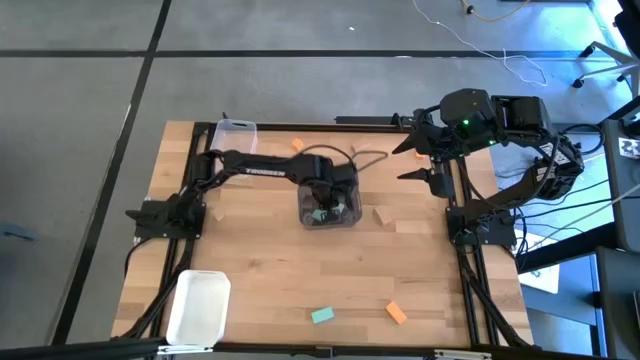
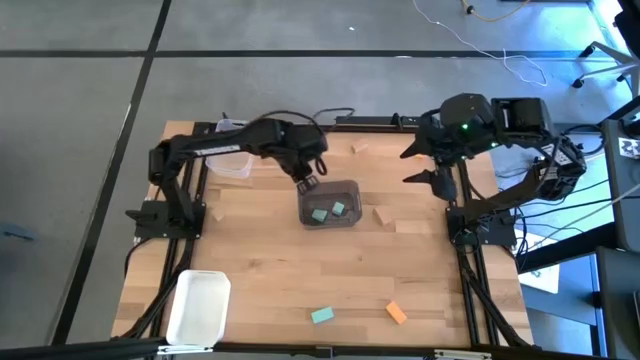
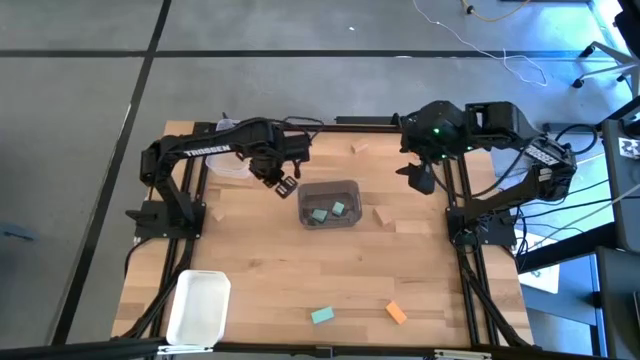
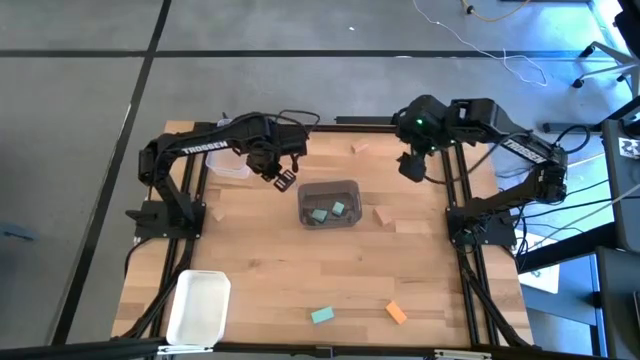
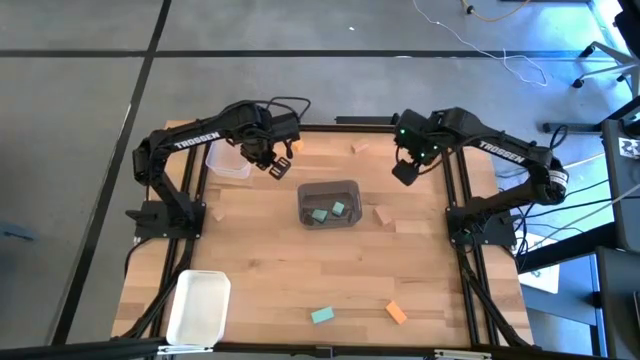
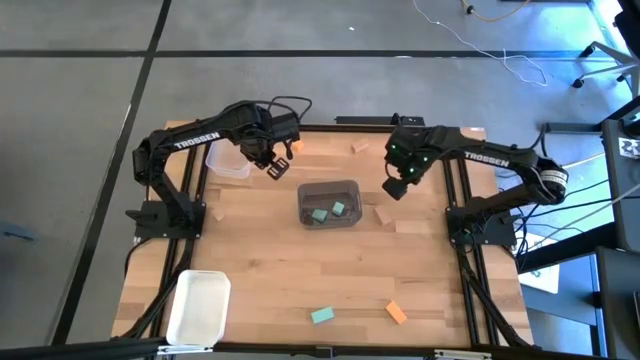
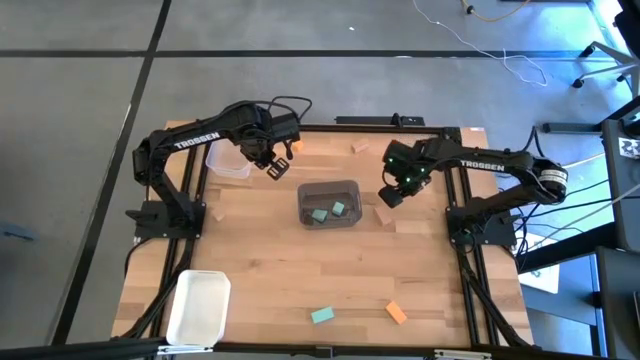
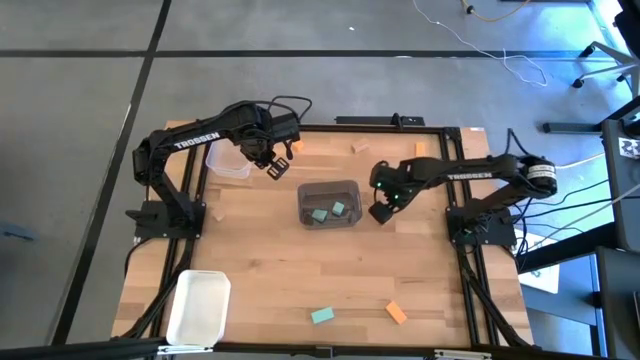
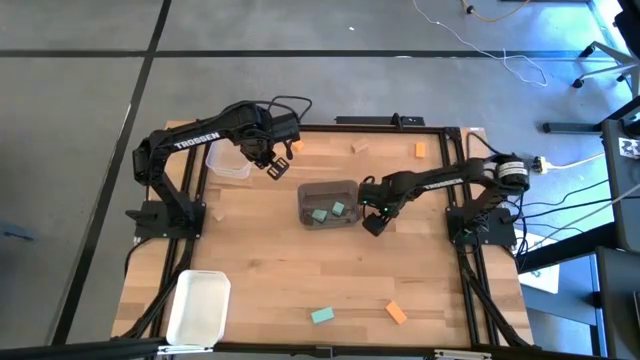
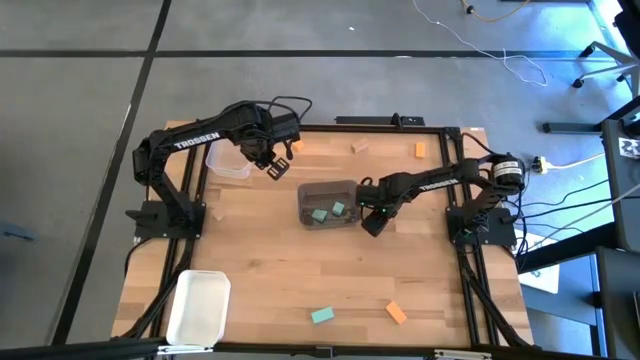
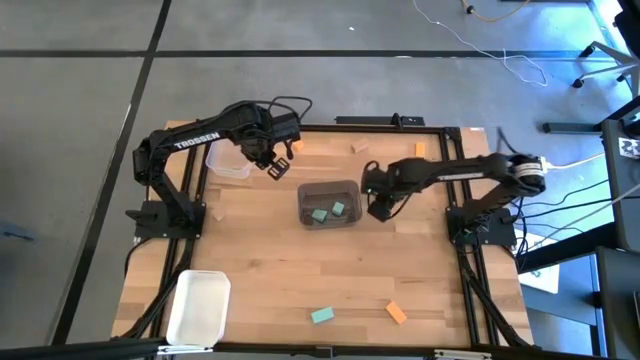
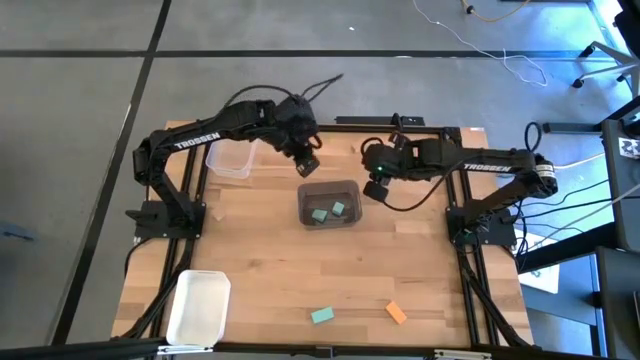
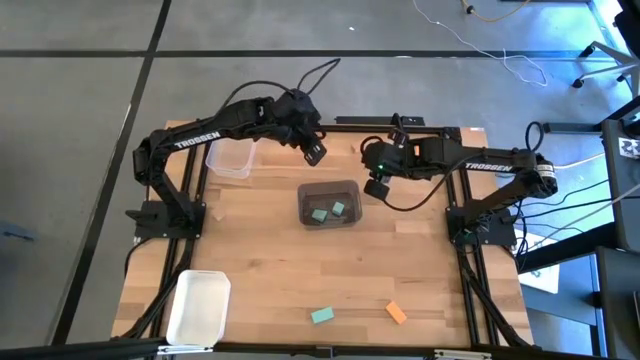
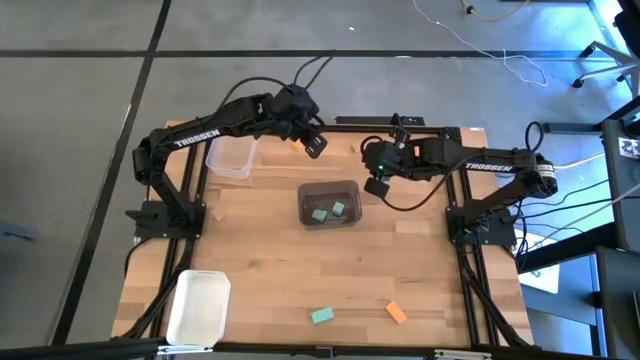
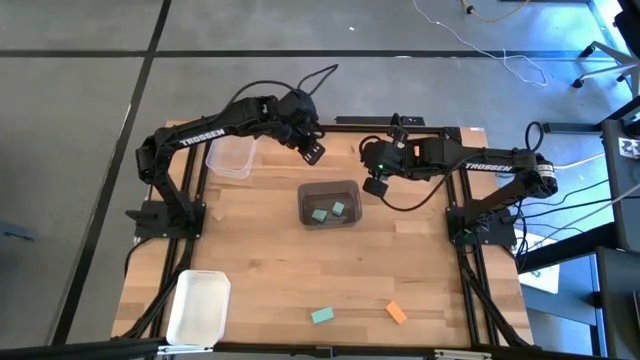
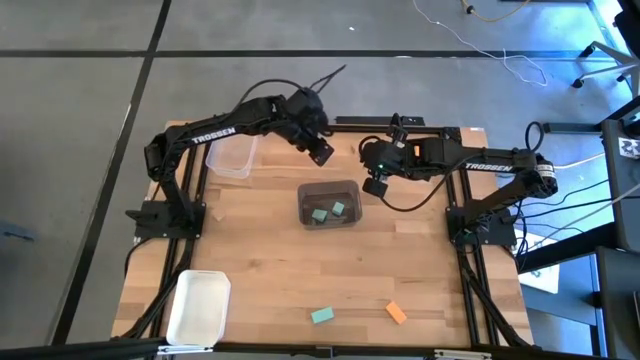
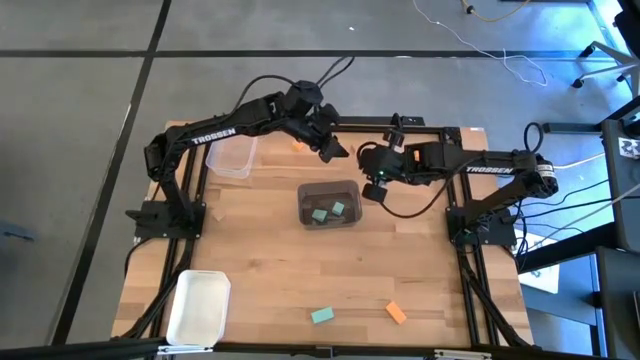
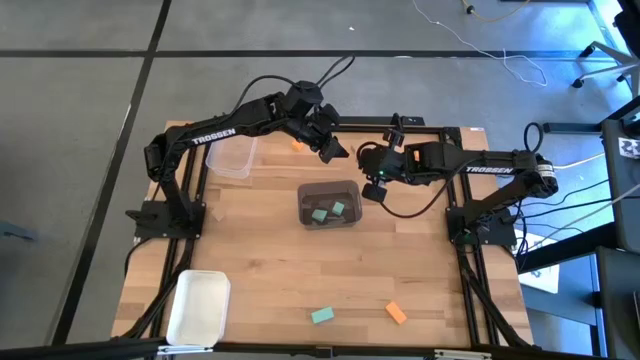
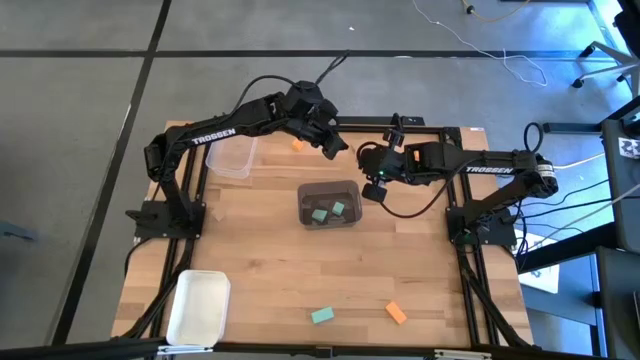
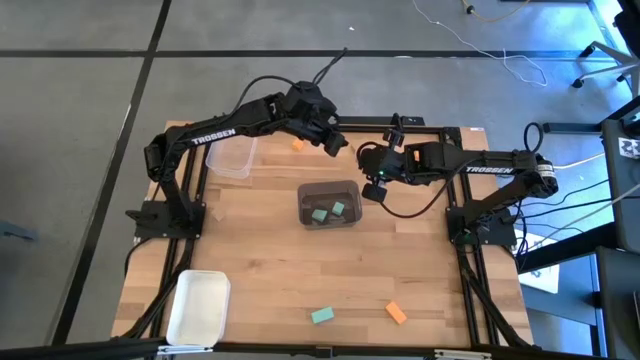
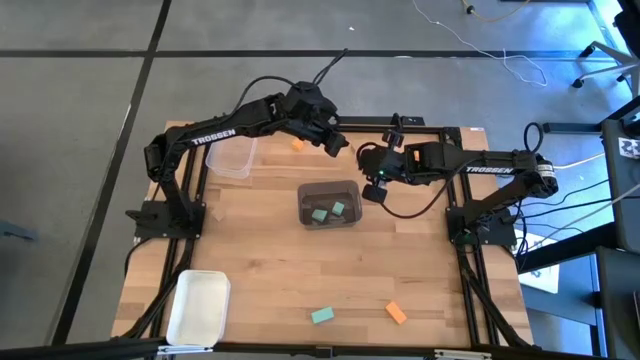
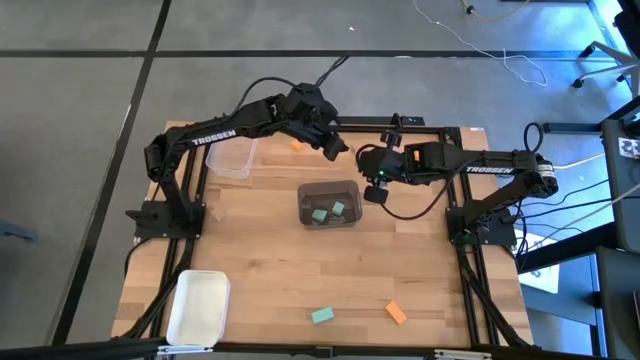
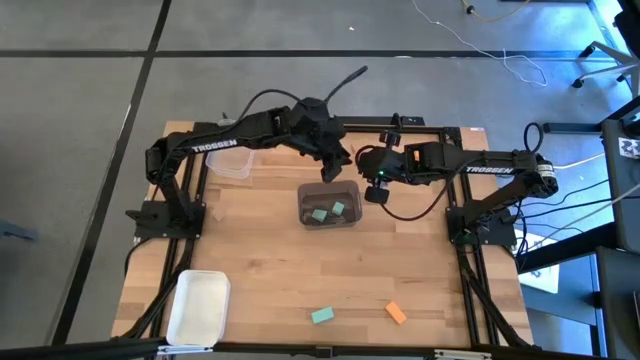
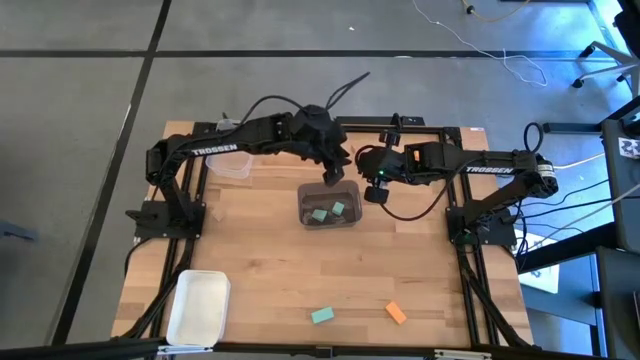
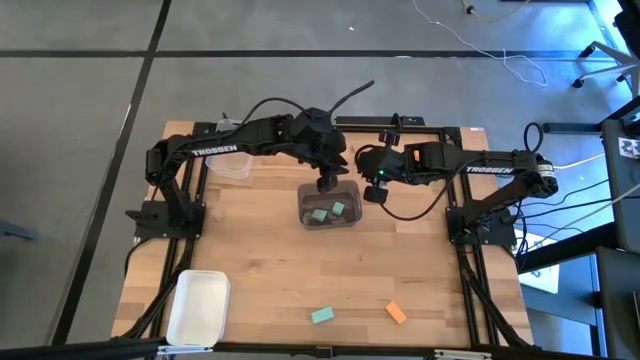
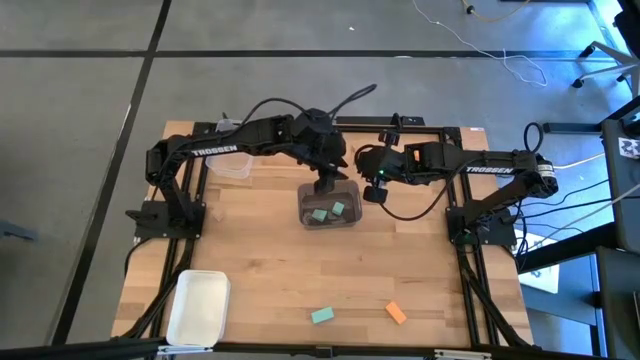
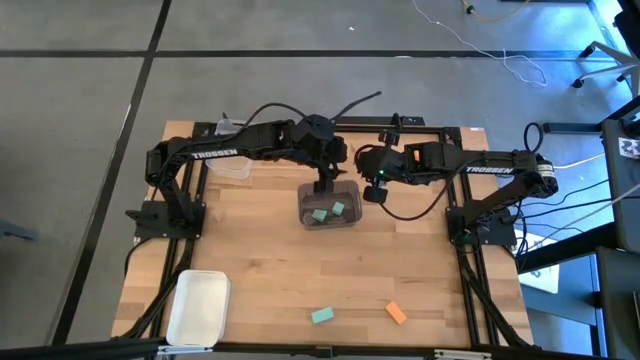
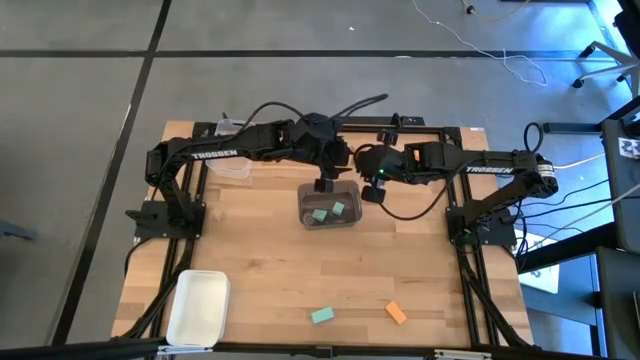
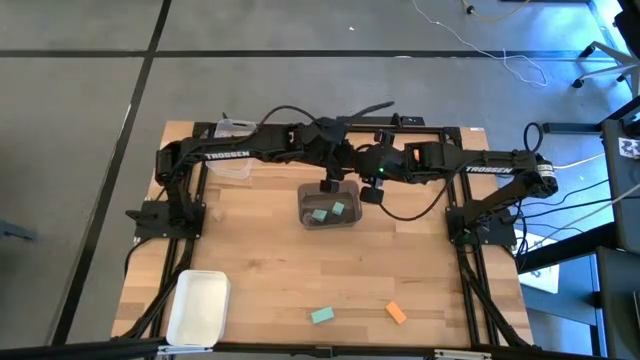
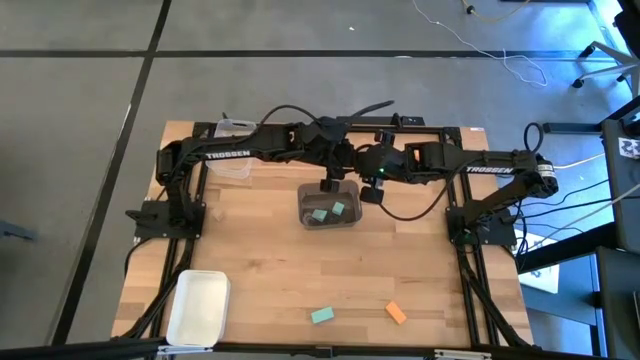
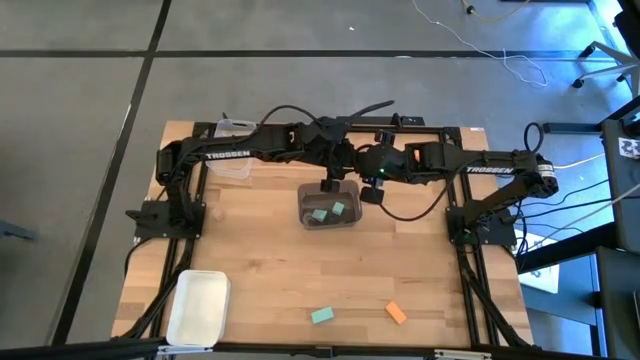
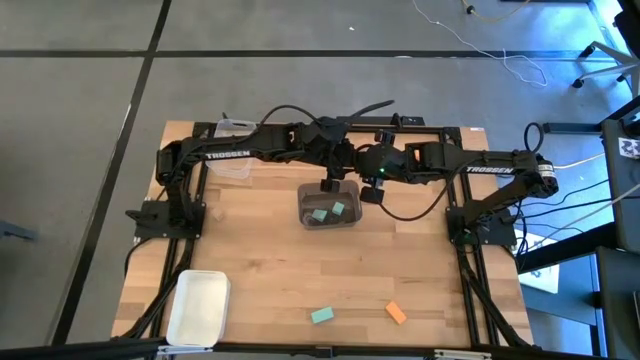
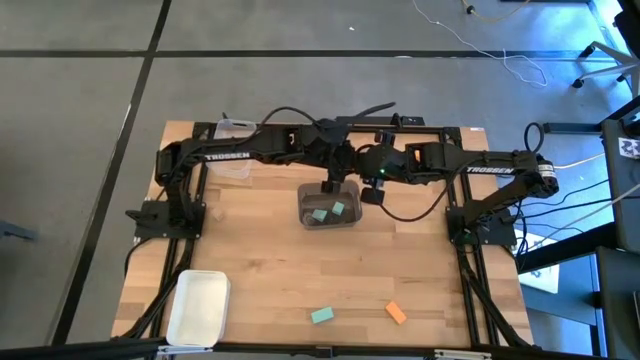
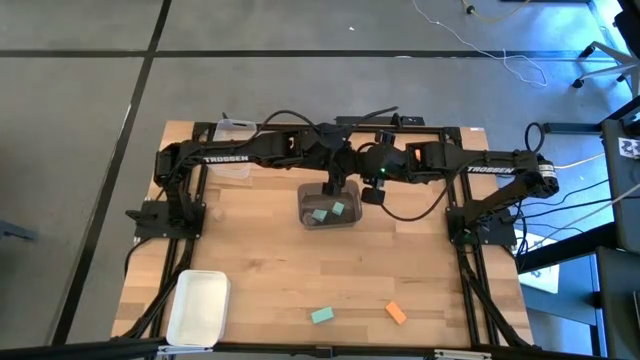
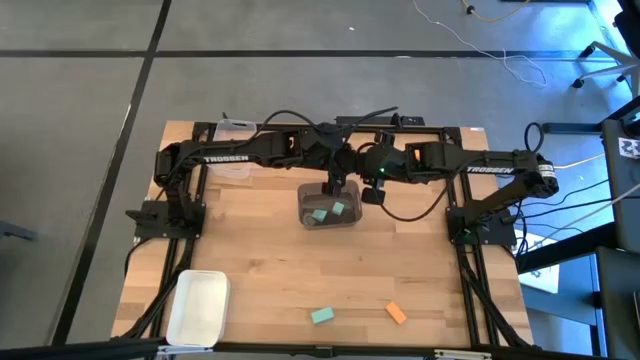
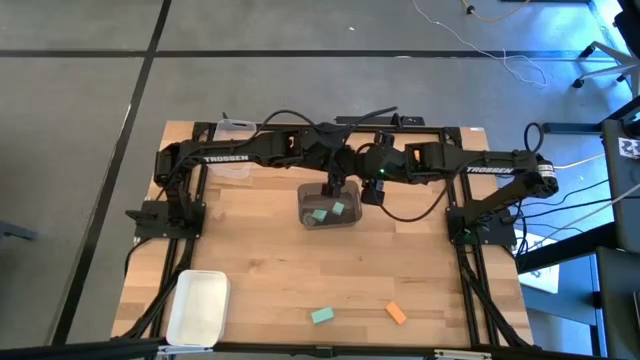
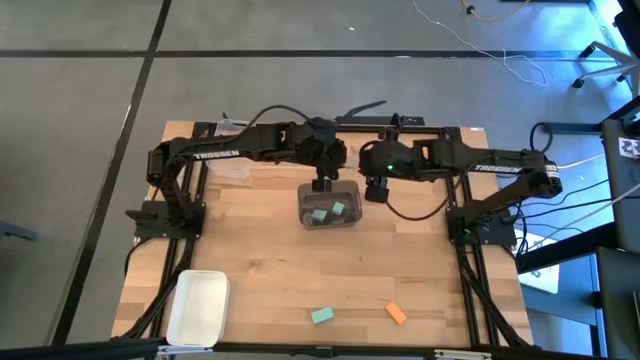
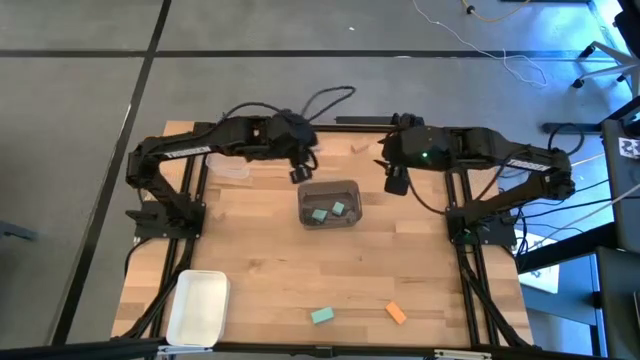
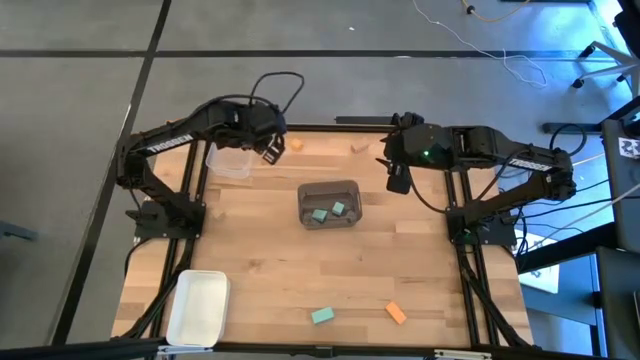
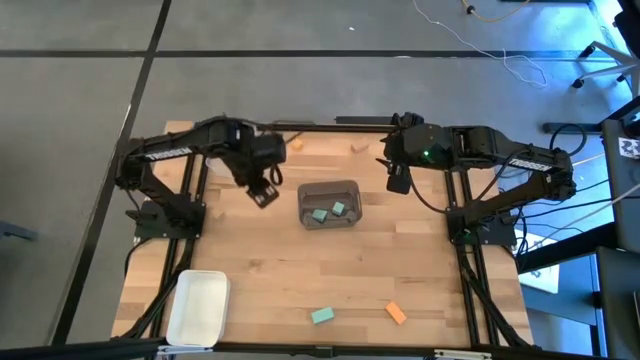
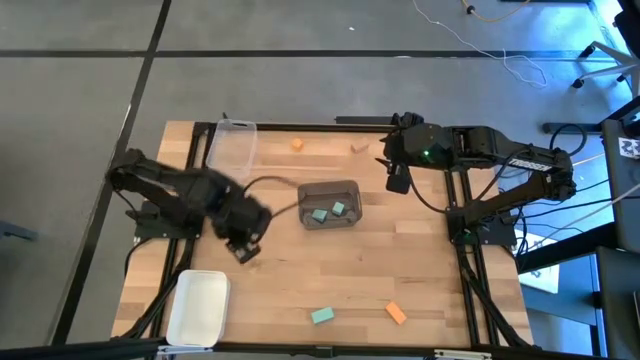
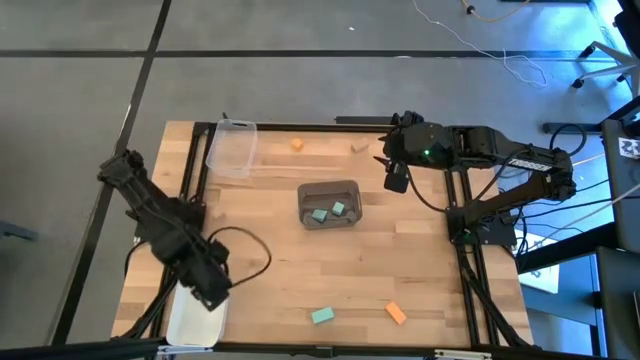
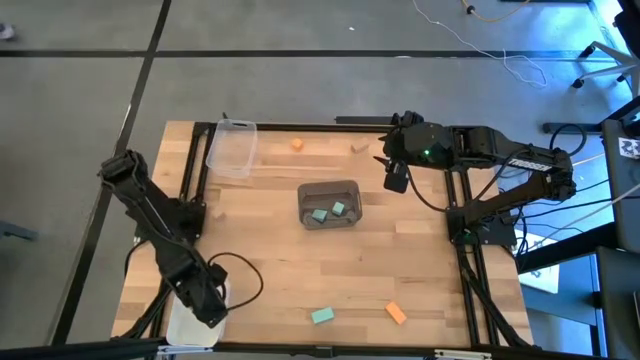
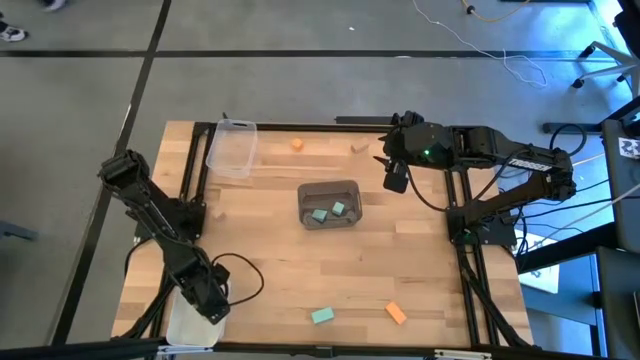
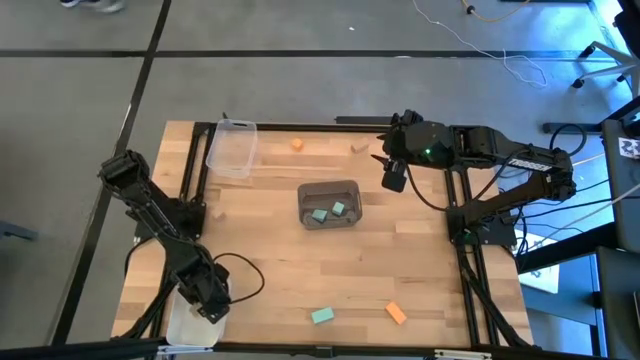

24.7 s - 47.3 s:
Task: Sort & place blocks by color
Put the bottom right brown block into the white bin
